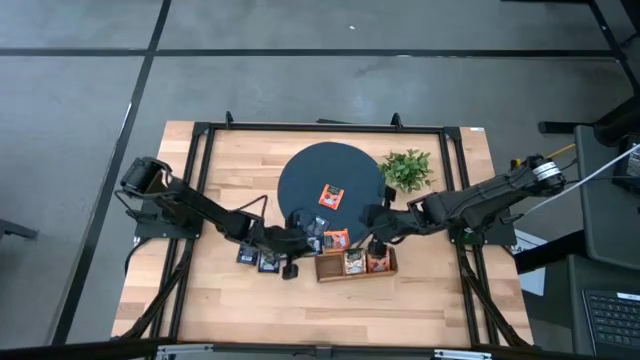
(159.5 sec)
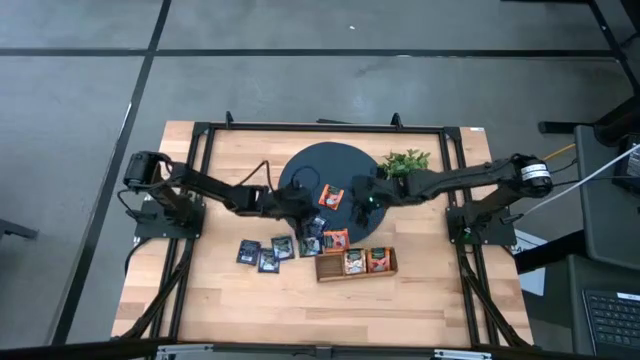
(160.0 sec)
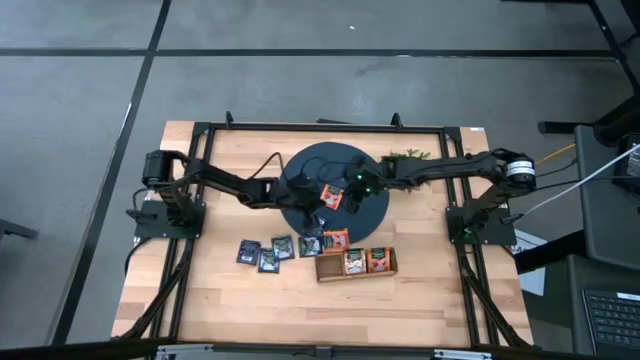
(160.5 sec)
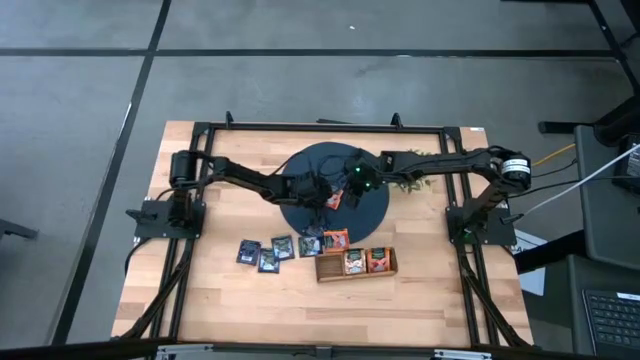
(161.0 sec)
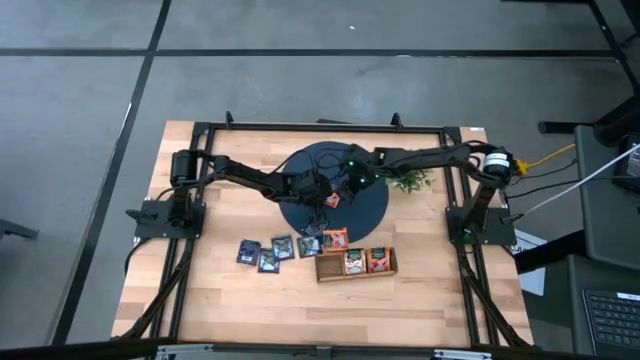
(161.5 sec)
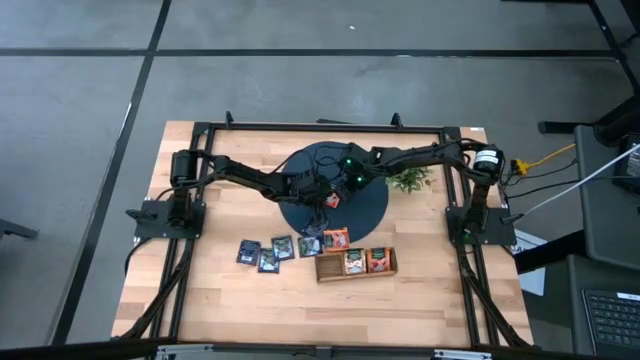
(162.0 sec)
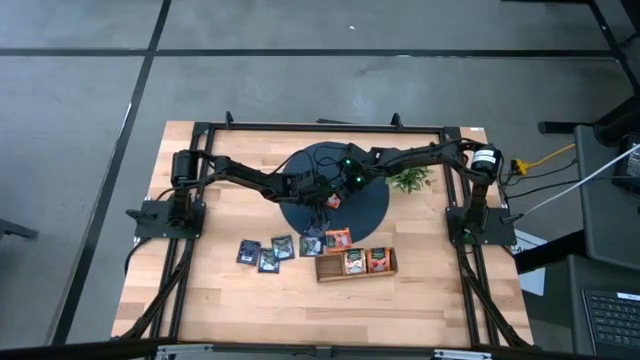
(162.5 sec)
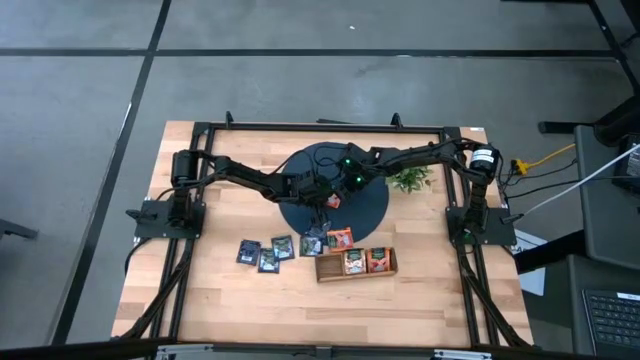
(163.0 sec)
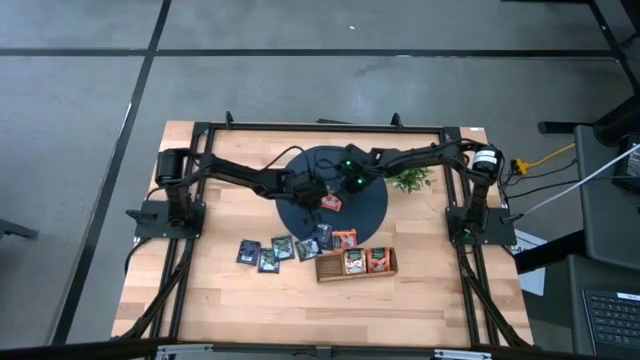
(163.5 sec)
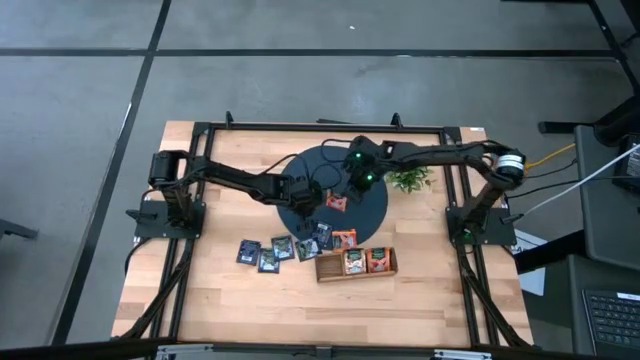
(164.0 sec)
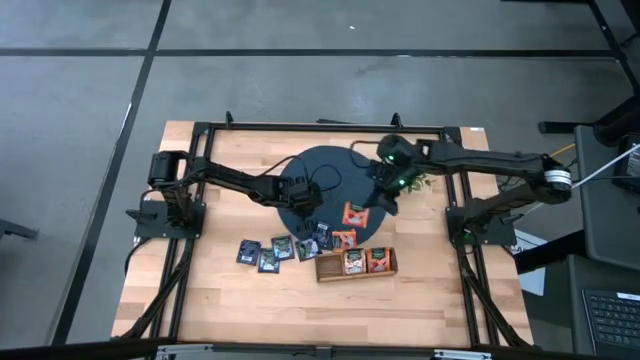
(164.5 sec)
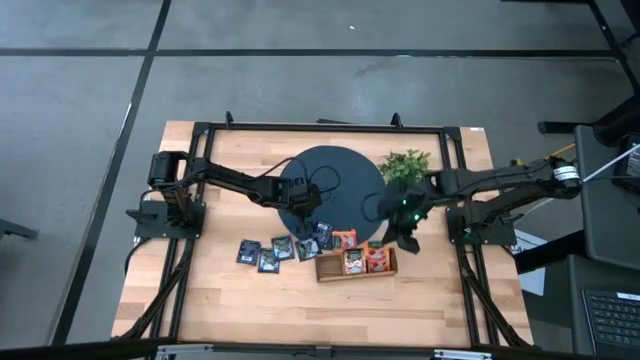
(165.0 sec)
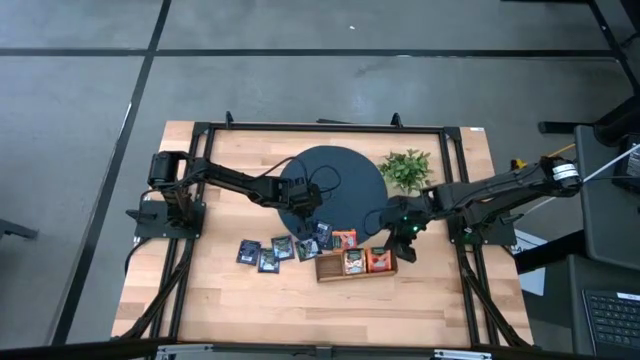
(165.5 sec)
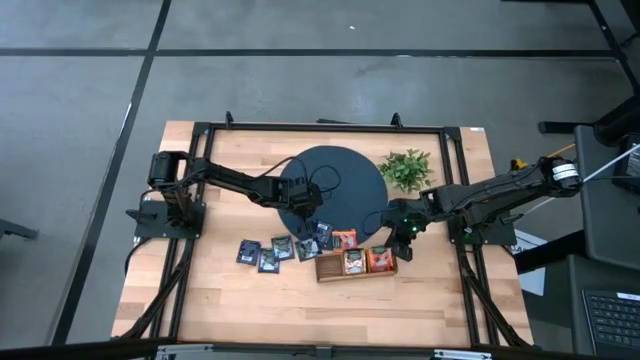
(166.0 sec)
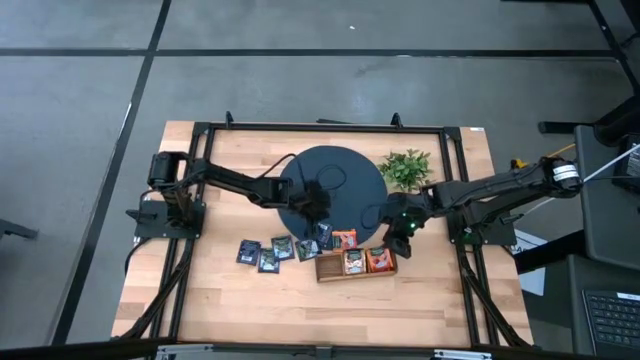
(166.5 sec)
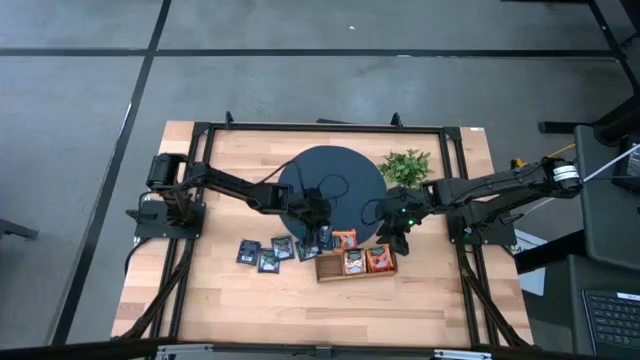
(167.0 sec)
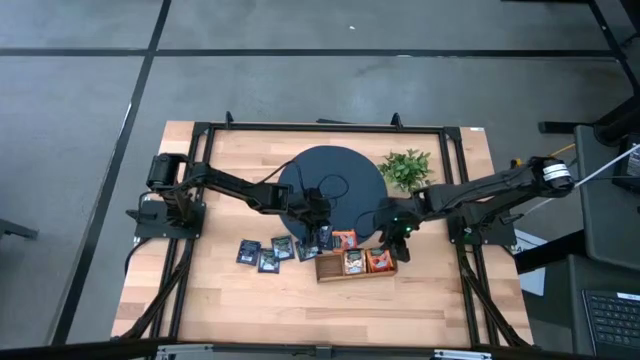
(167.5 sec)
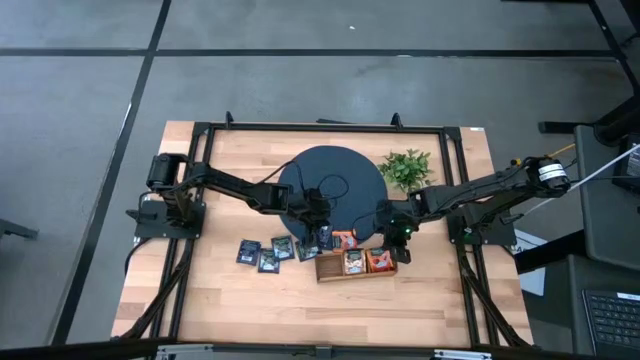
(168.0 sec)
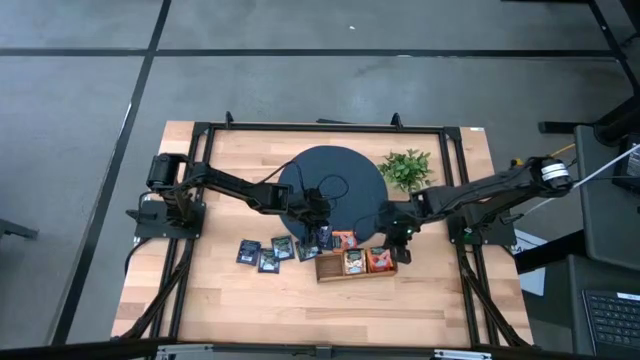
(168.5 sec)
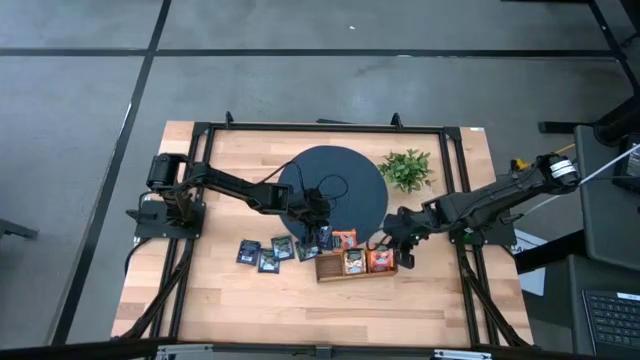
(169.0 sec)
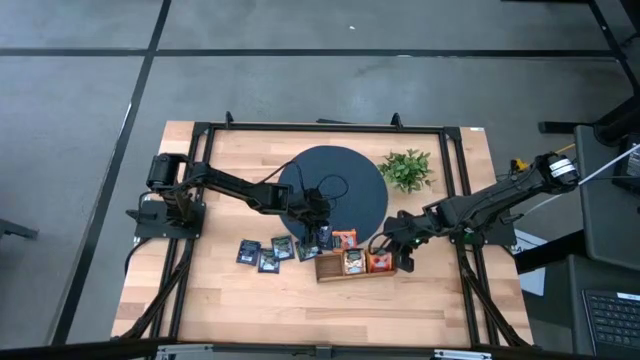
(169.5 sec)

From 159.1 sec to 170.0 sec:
Task: Pick & Place Tea
Put the orange tea bag into the right section of the wooden organizer

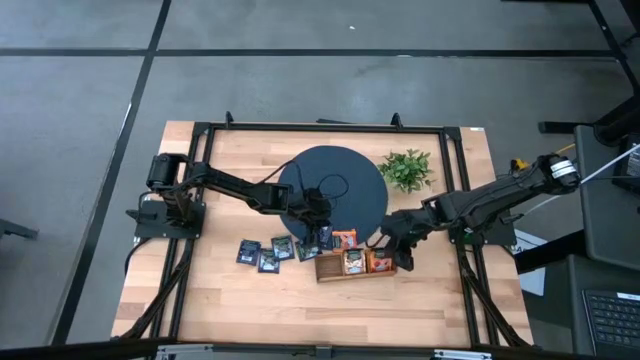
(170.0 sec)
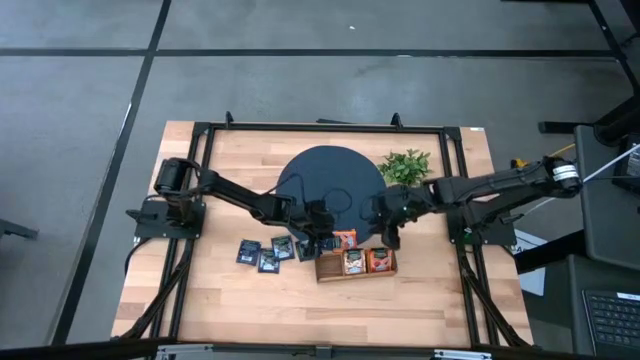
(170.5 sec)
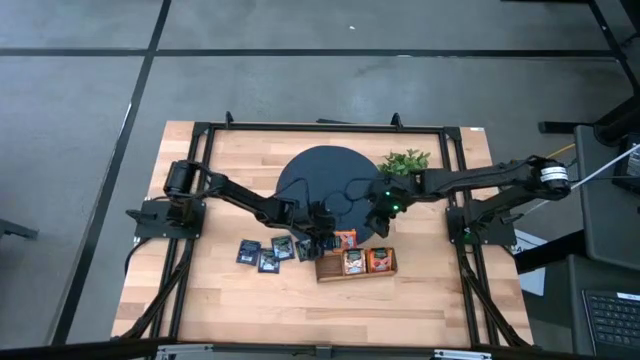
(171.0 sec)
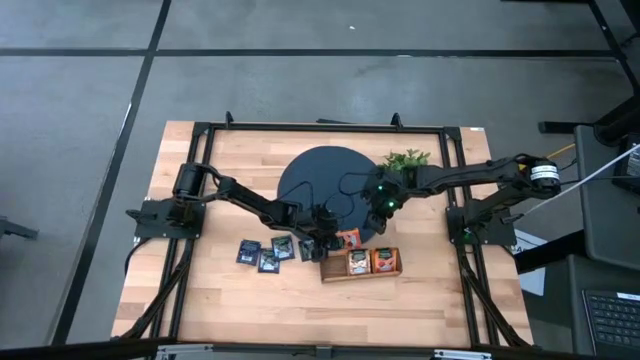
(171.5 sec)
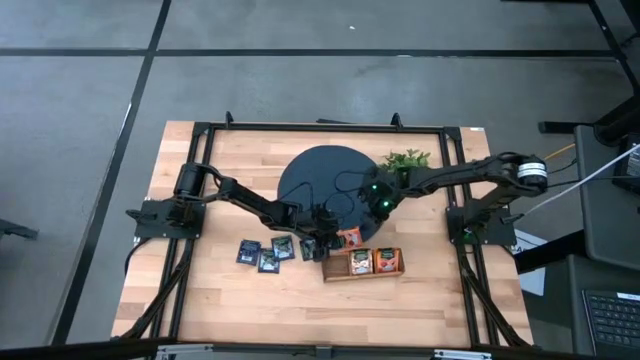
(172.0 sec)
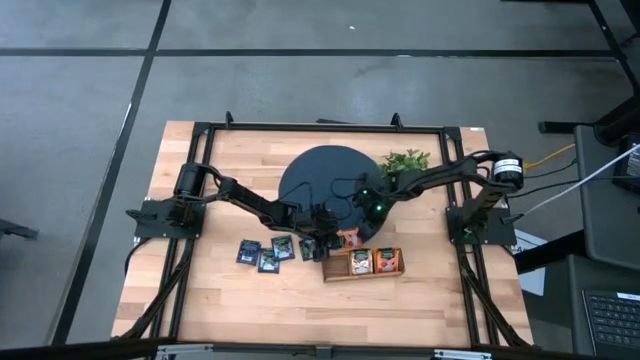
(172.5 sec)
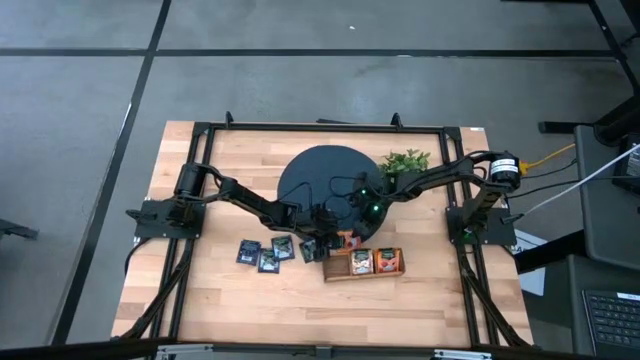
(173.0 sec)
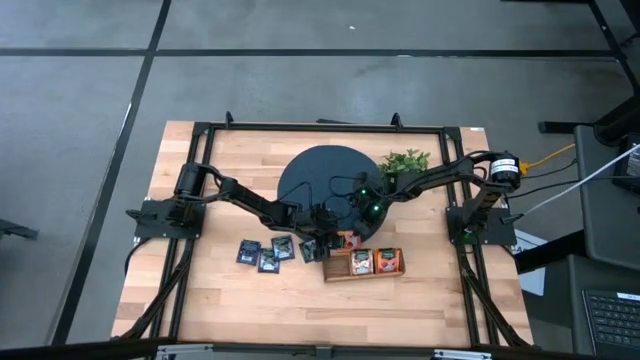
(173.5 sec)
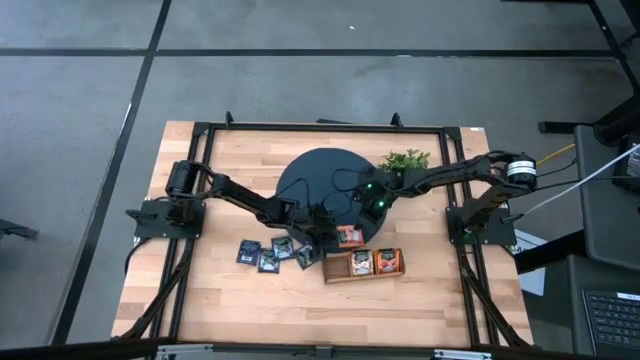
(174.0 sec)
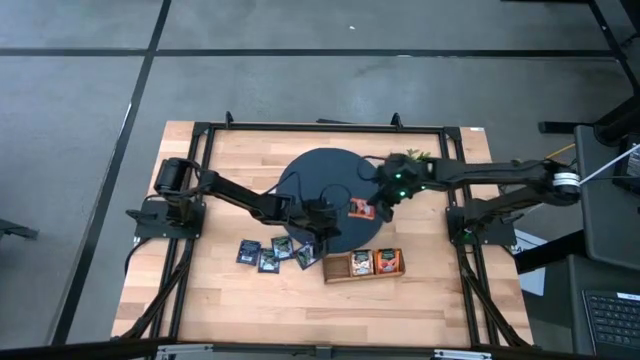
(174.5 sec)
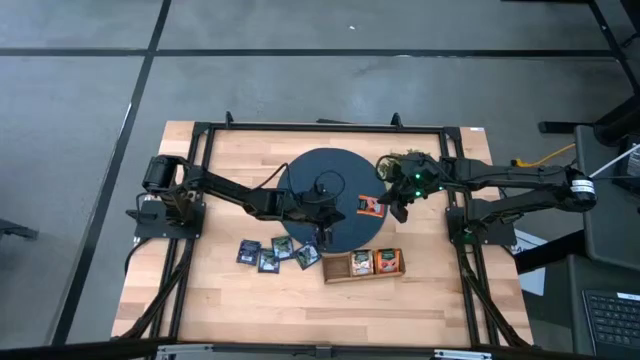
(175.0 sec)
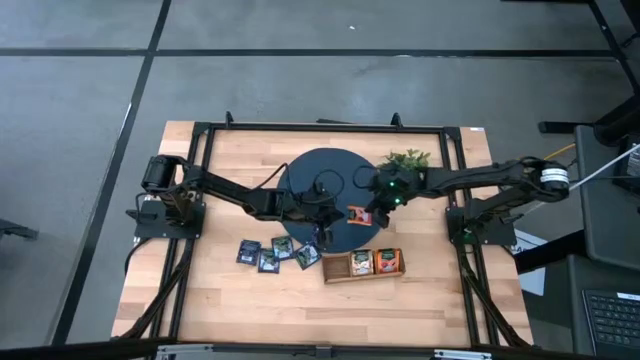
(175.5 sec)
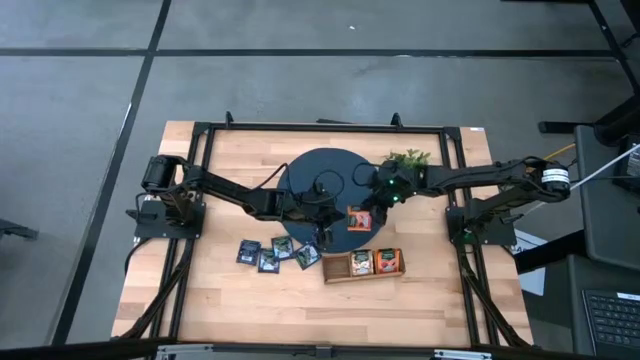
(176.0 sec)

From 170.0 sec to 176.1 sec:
Put the orange tea bag into the right section of the wooden organizer
